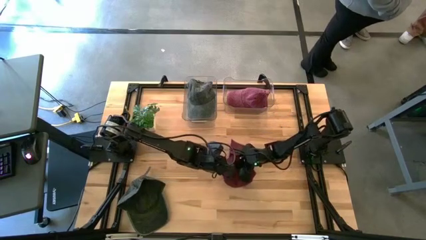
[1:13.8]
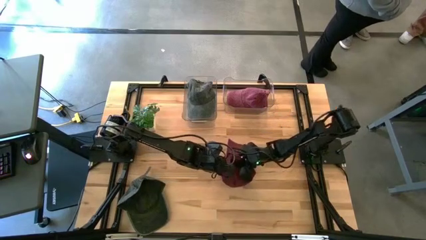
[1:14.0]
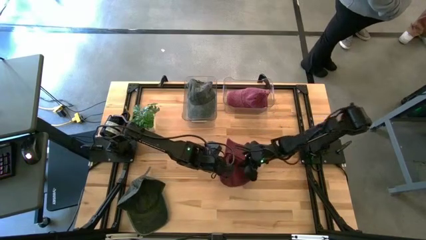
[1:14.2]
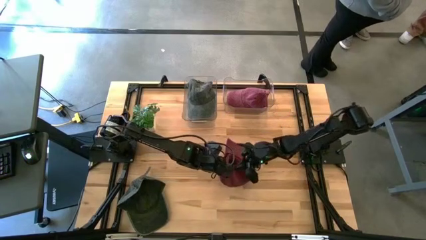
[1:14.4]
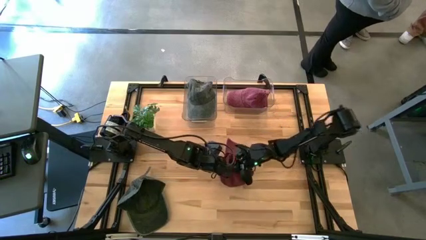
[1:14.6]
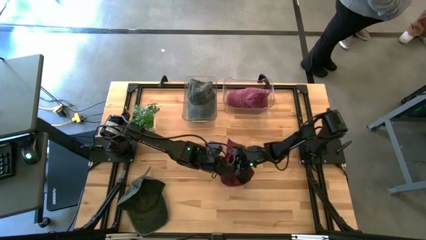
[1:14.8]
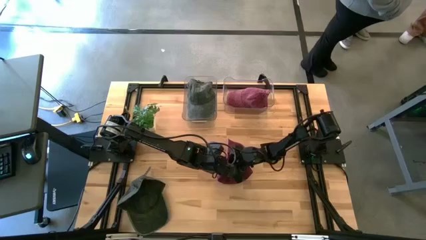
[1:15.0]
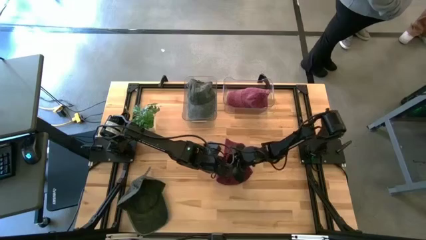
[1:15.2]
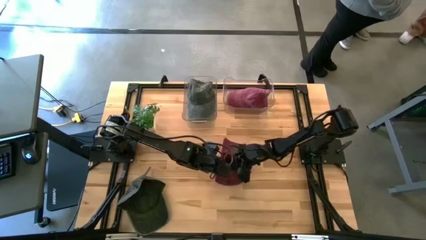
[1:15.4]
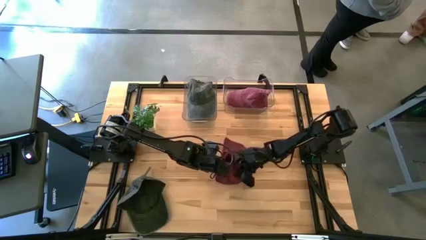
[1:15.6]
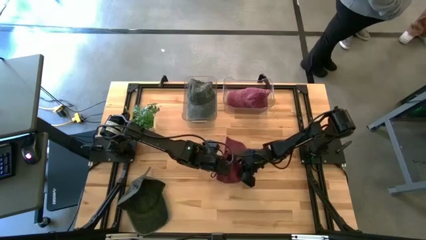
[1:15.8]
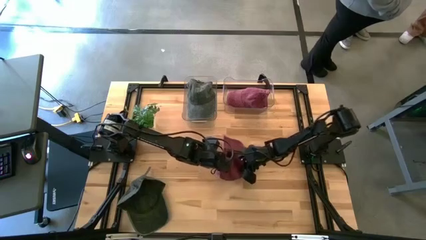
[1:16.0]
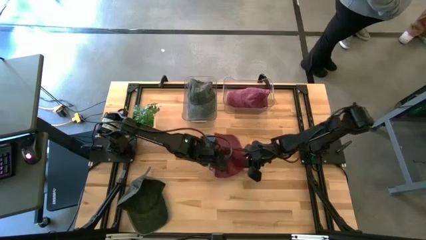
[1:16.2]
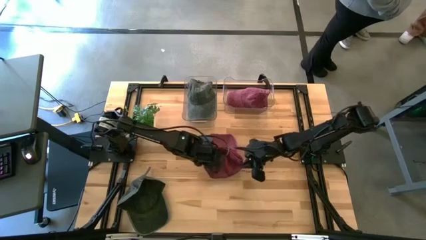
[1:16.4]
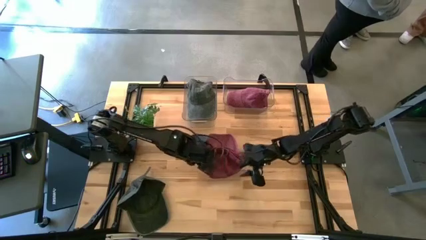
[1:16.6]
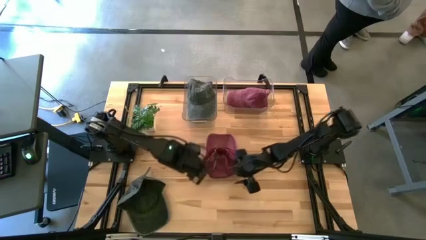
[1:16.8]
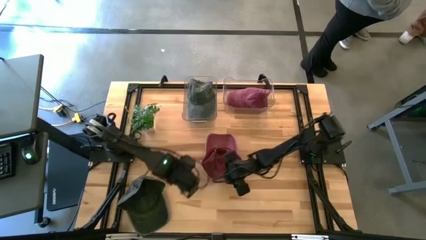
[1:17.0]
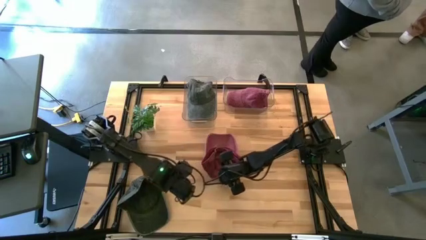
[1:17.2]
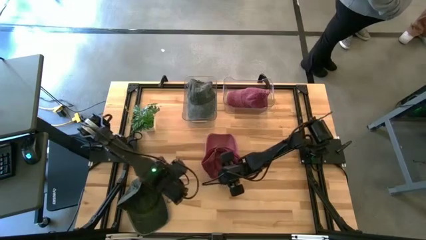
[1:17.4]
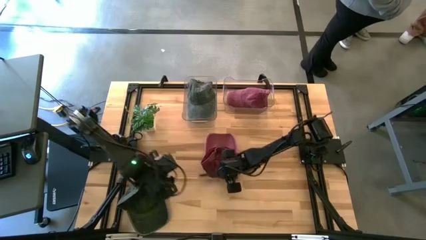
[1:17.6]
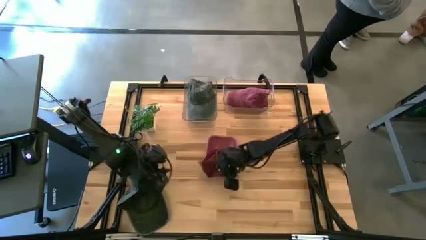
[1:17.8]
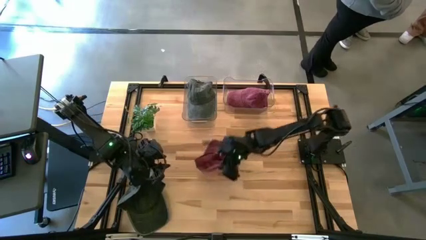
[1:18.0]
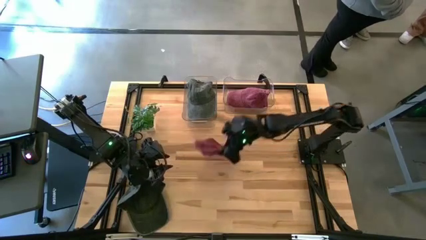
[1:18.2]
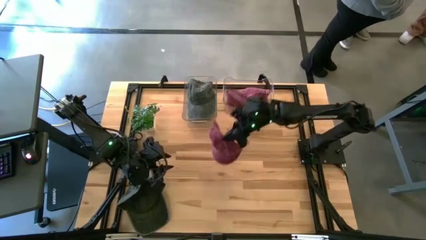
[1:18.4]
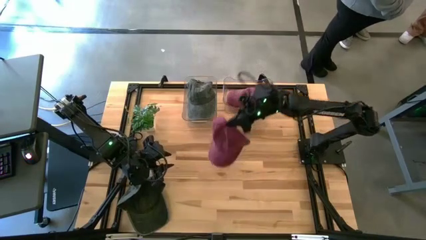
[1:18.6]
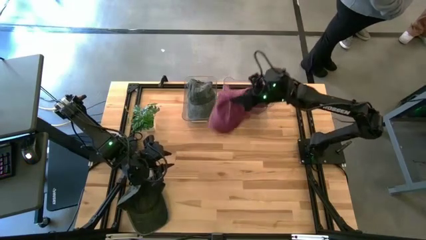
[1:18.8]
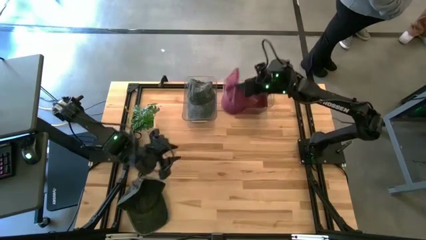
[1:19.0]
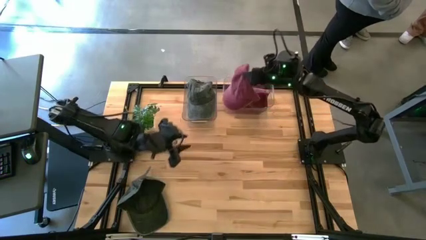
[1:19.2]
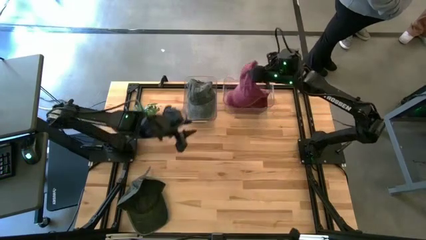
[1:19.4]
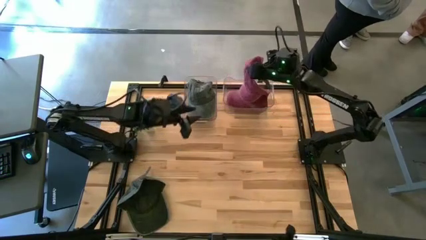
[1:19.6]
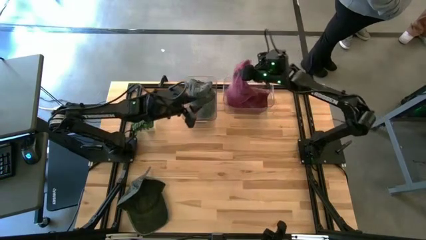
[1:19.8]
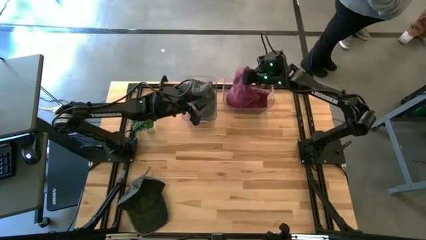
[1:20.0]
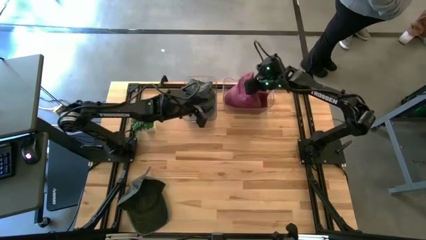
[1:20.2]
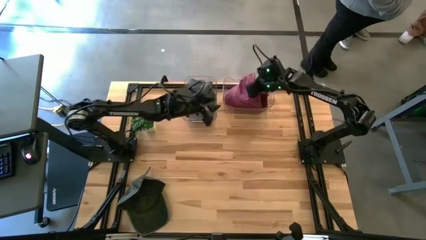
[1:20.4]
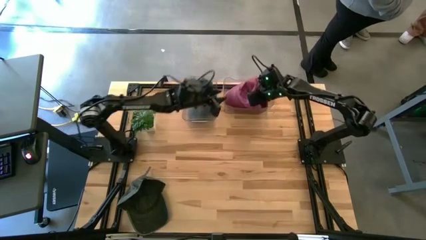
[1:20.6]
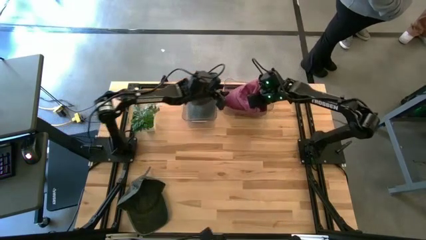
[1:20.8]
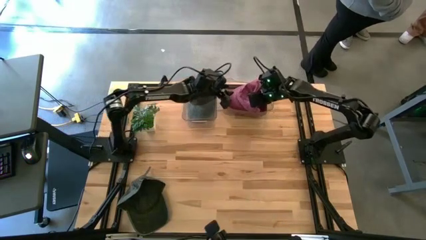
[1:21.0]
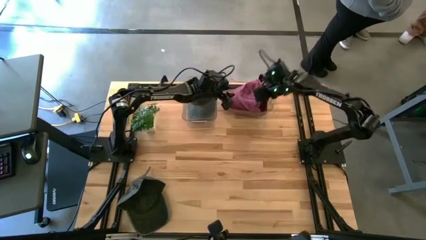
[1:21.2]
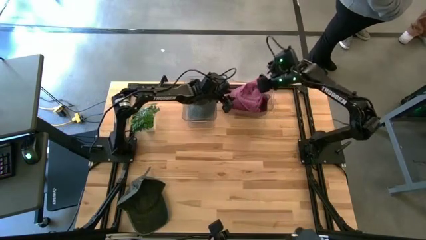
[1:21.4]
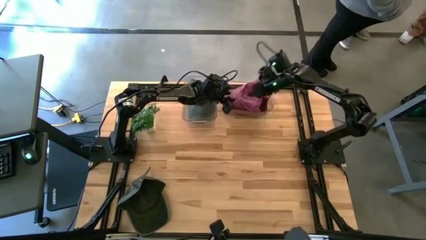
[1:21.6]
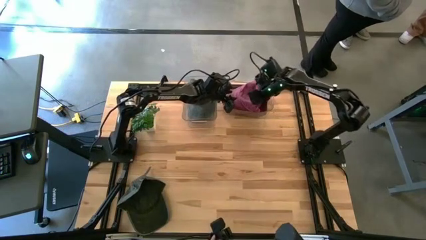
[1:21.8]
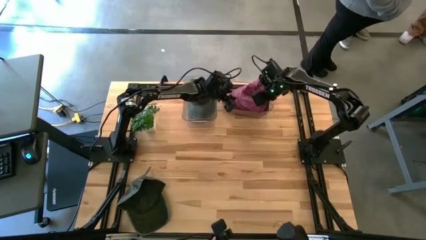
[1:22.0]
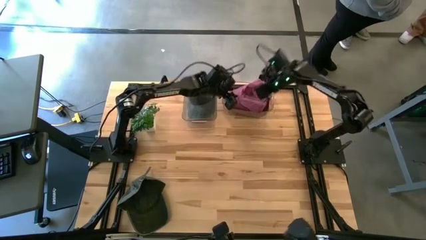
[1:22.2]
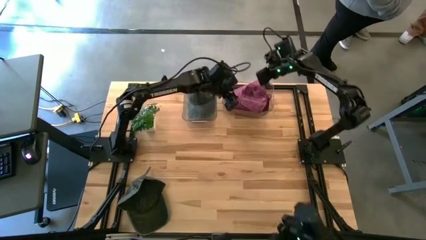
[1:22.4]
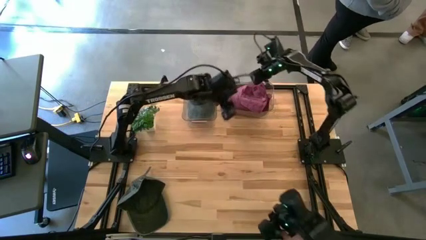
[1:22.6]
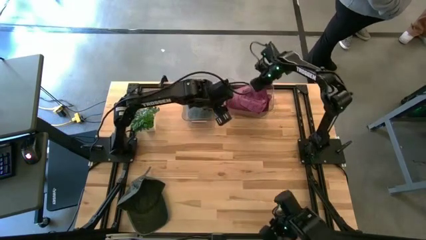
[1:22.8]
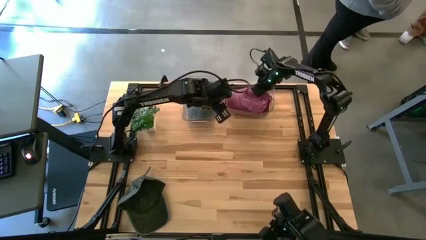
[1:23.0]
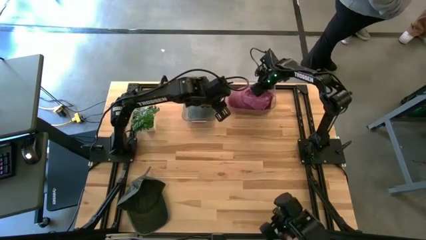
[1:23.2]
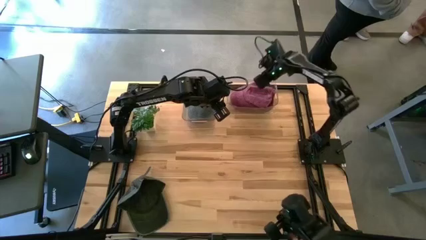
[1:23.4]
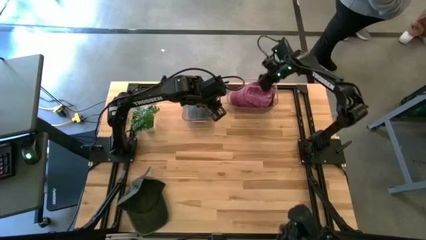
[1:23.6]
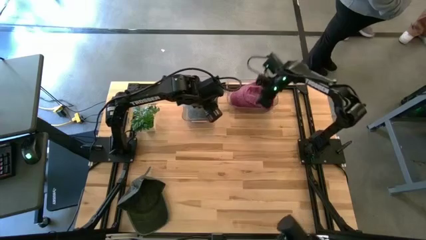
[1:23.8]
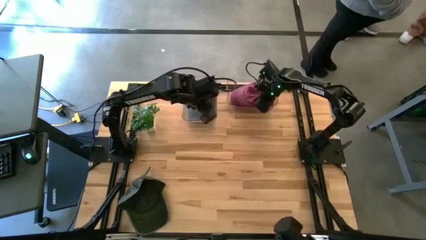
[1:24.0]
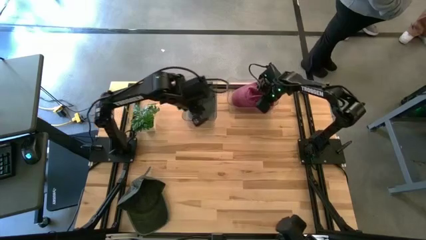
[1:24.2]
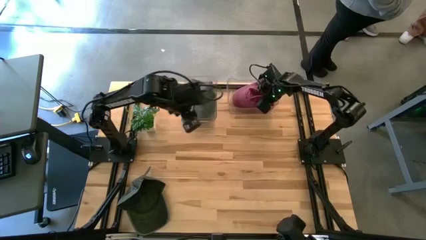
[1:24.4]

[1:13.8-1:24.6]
Task: Pick & Place hat
Put the red cap into the right transparent bin

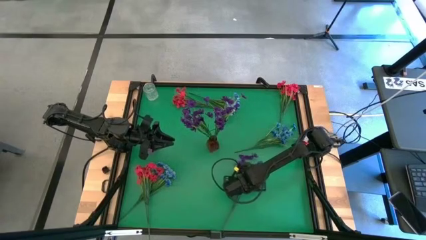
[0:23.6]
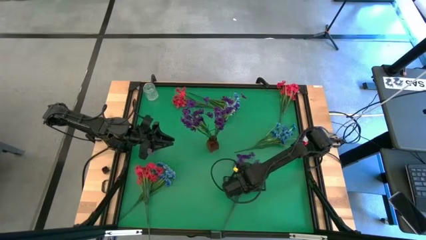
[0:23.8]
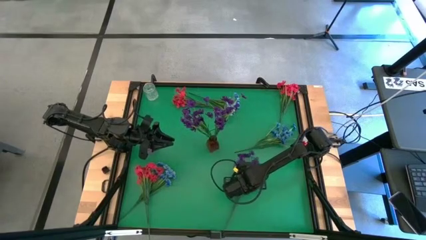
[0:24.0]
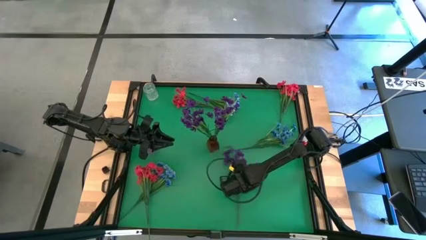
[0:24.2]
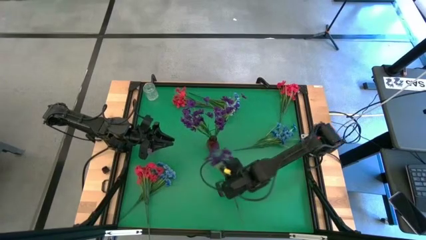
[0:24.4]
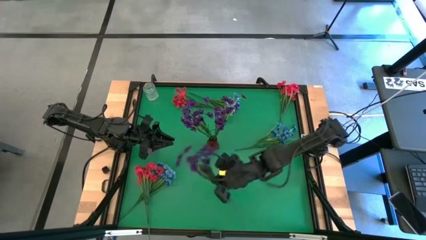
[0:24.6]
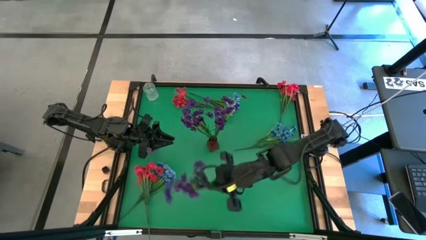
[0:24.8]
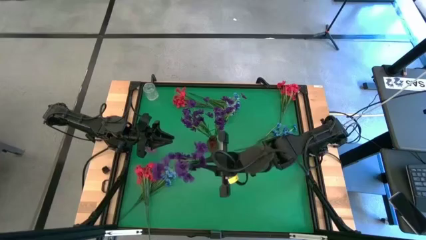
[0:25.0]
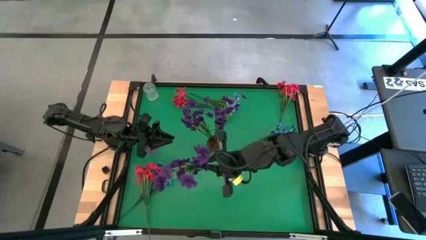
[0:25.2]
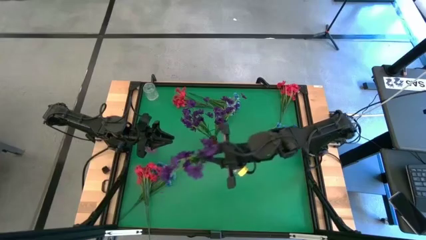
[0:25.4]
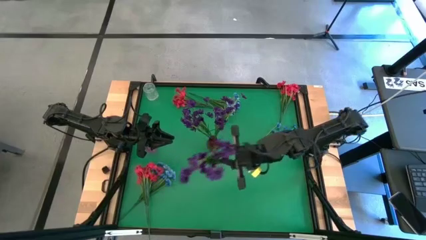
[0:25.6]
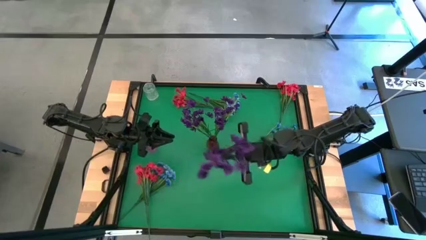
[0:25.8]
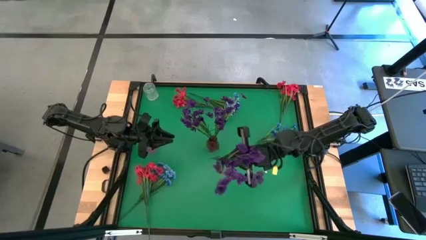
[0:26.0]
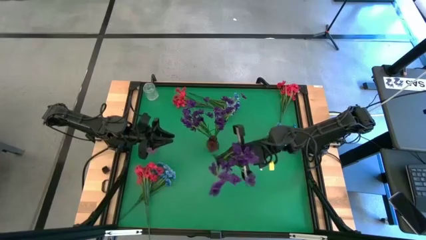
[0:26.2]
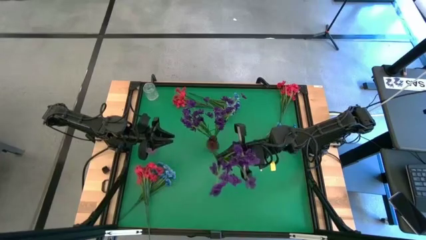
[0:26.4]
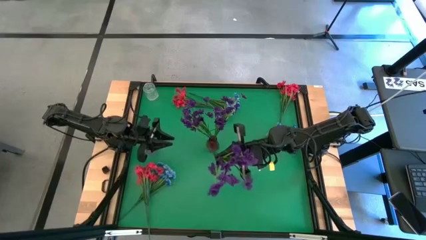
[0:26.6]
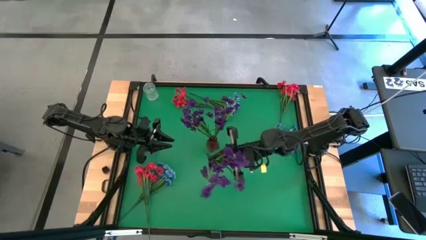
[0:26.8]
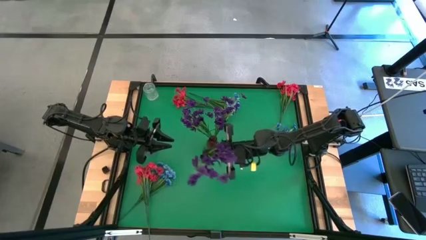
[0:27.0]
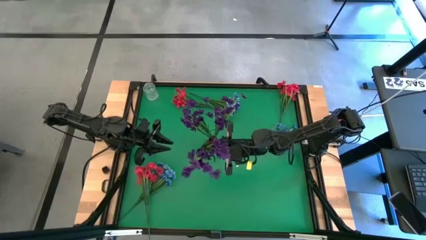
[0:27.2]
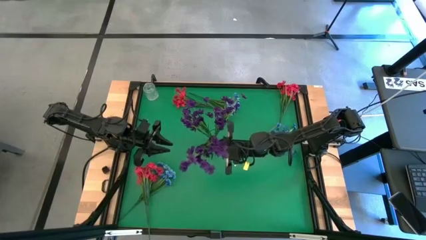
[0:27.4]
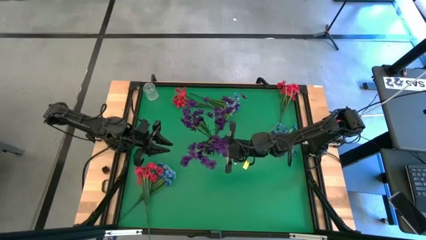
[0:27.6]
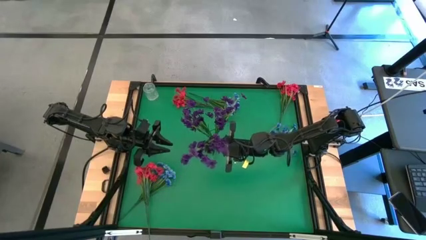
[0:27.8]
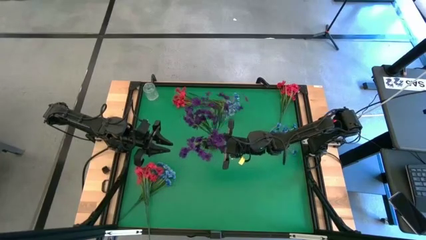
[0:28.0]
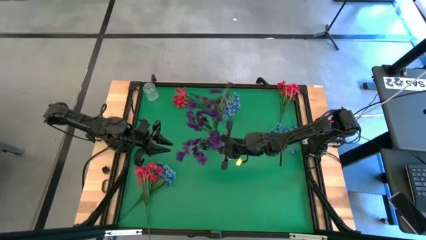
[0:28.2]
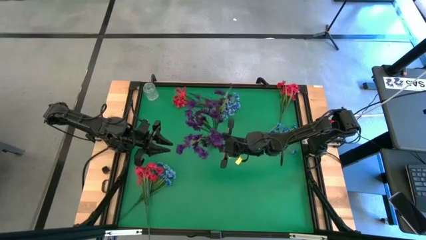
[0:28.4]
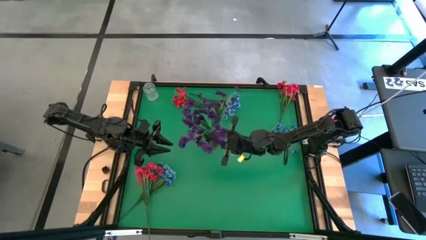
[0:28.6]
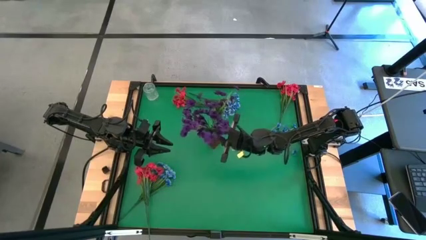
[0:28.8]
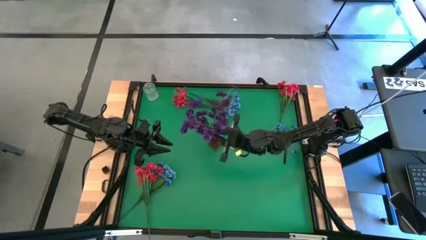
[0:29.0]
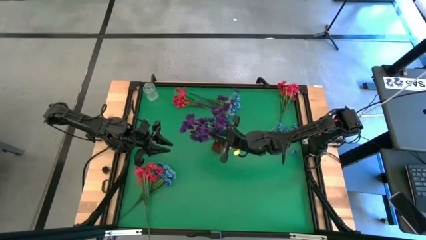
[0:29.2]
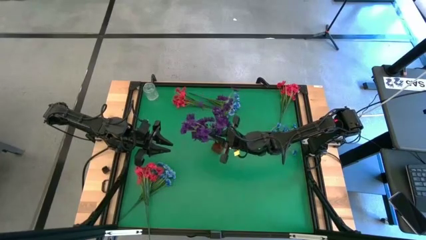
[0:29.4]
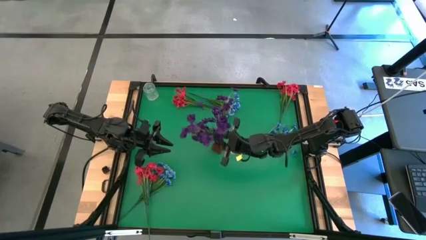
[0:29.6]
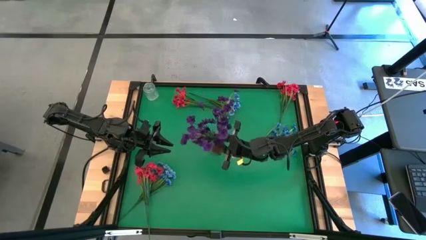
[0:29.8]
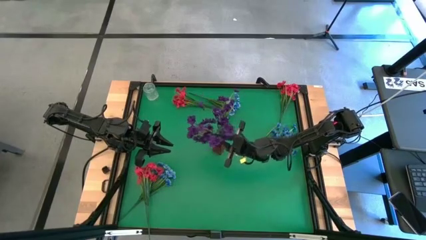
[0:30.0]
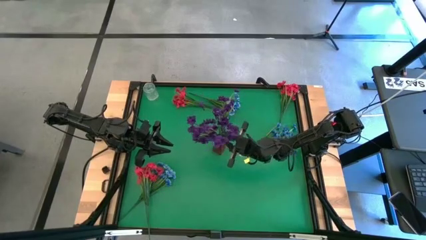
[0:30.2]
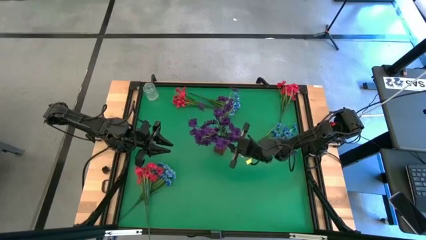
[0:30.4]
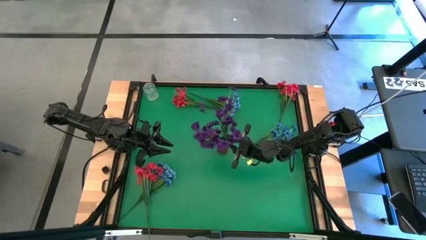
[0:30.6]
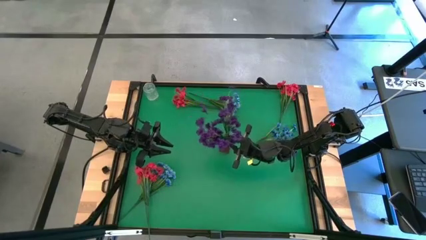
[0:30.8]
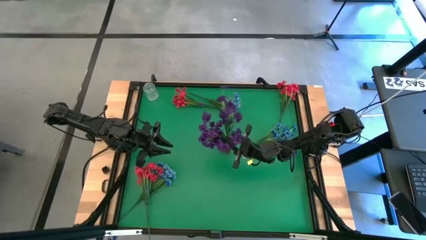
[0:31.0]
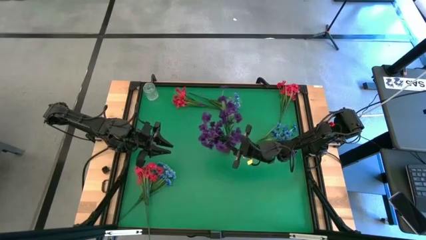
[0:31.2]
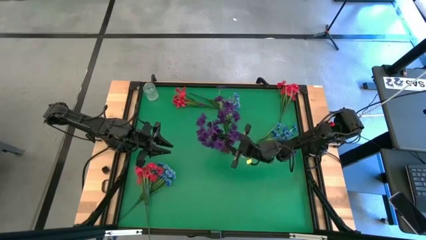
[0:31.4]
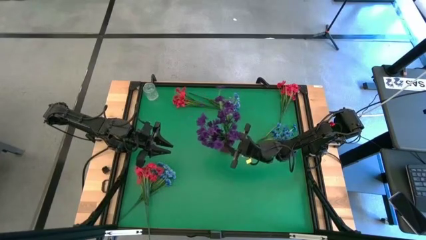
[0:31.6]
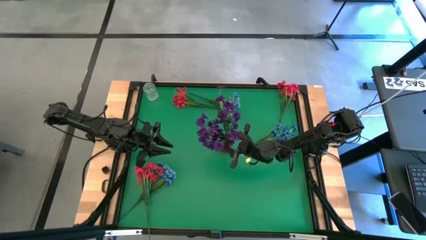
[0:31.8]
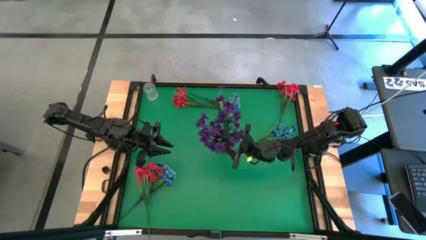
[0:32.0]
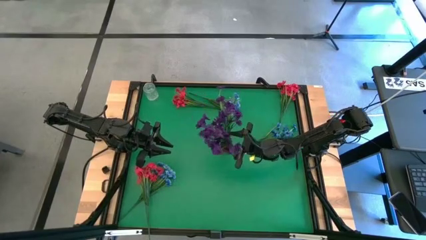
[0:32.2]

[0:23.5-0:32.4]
Task: Sort flowers into vase by color
Put the violet flowers into the red vase
